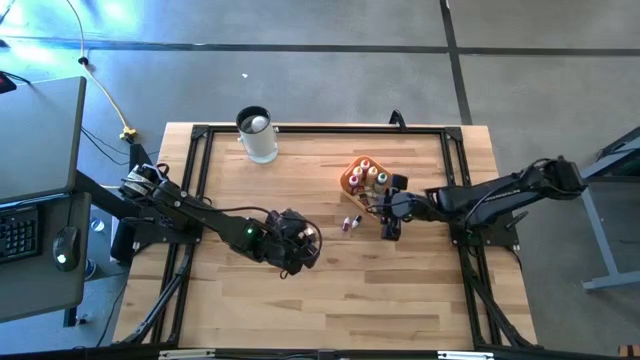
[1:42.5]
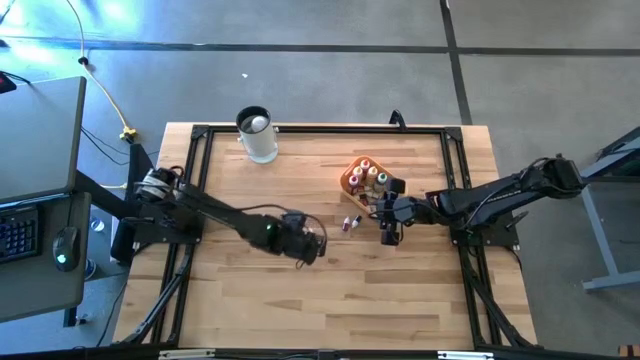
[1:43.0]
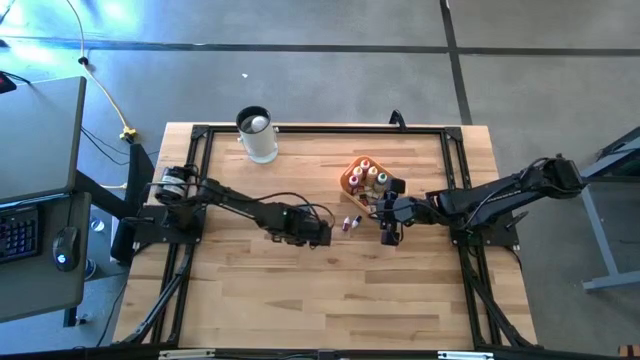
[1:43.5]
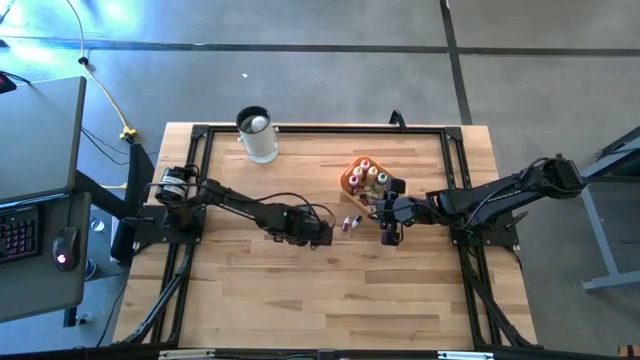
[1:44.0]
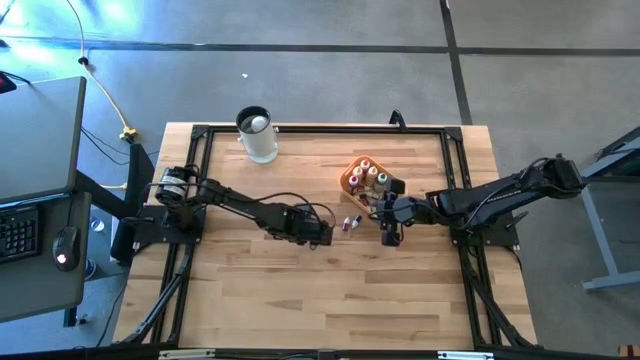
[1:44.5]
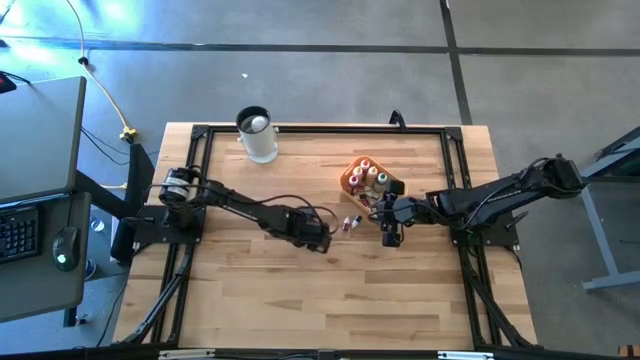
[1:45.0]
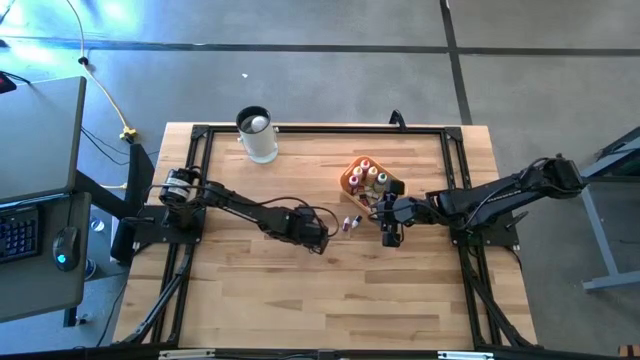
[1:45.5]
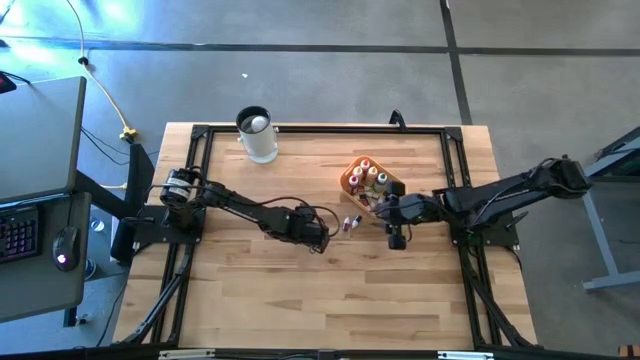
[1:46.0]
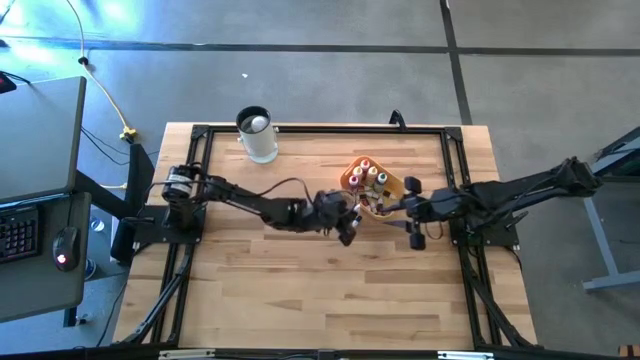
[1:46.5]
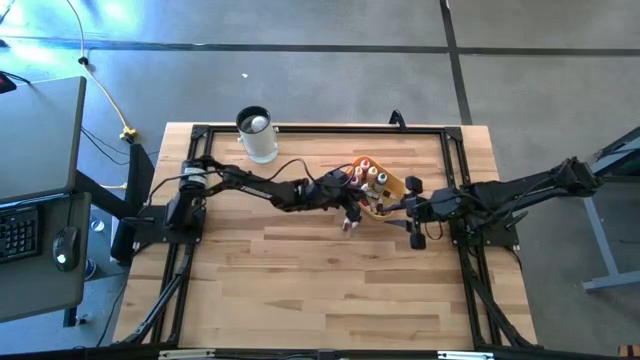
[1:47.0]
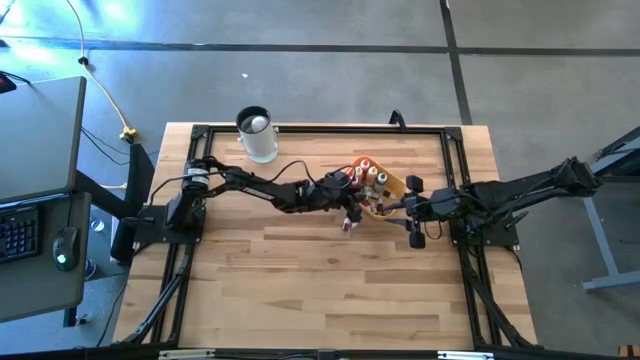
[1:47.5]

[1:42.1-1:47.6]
Task: Pick & Place food coloring
Put the small black food coloring bottle into the yellow bin

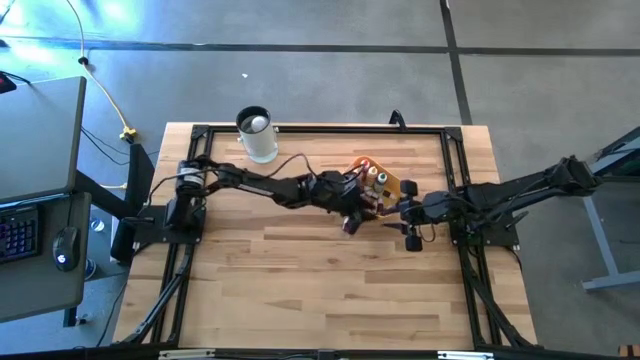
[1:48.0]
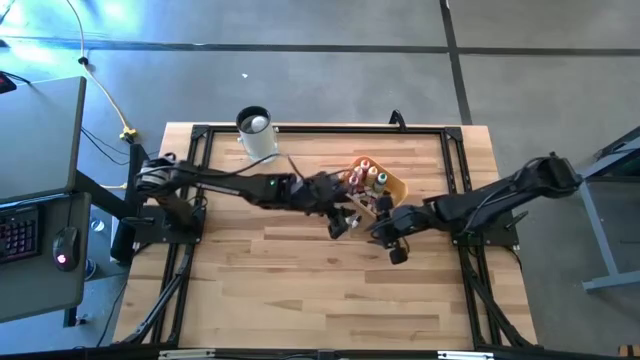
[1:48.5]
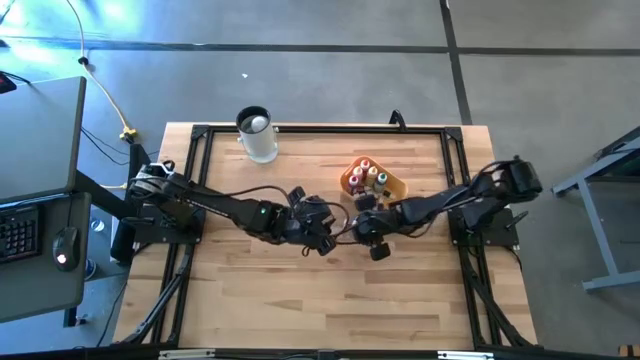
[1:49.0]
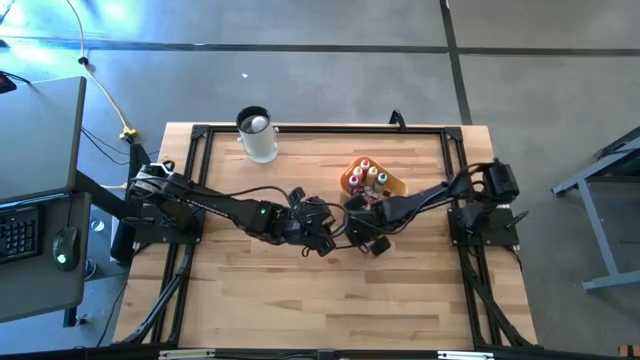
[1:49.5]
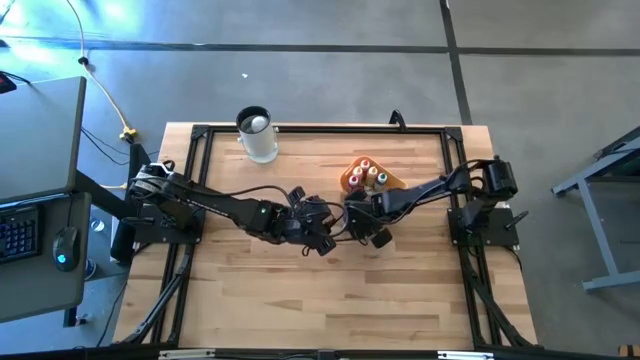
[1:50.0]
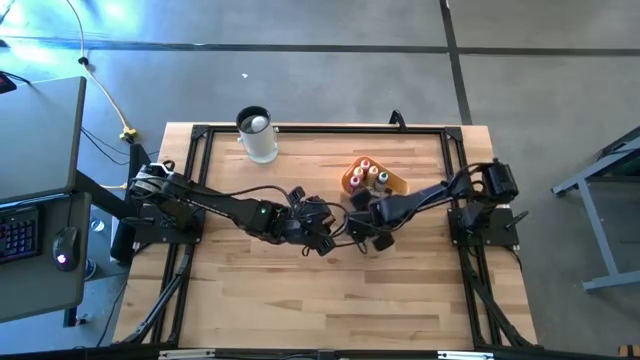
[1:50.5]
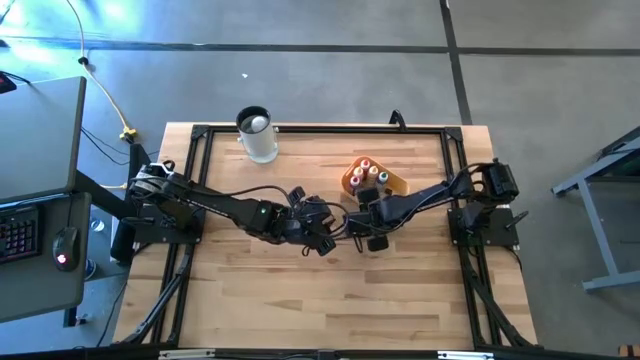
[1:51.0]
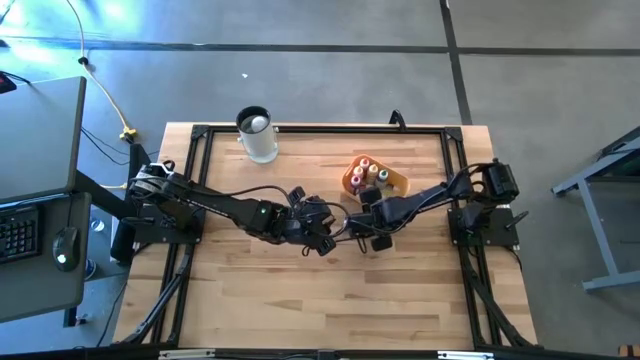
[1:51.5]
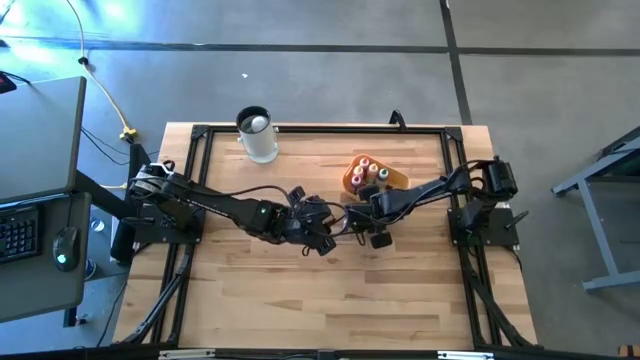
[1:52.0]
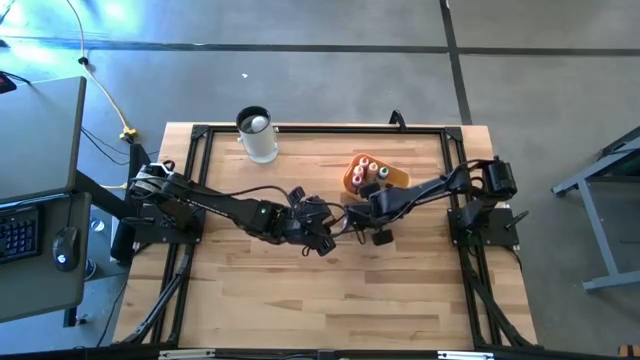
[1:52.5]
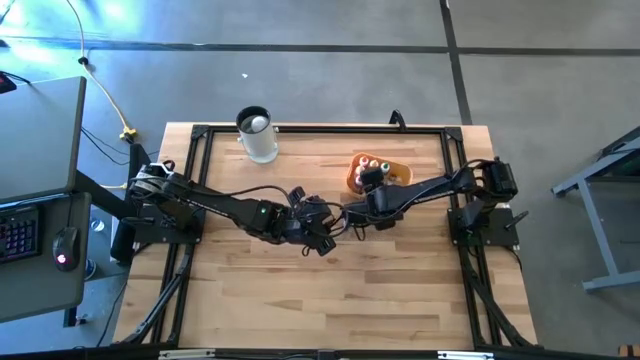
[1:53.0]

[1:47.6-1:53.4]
Put the small green food coloring bottle into the yellow bin

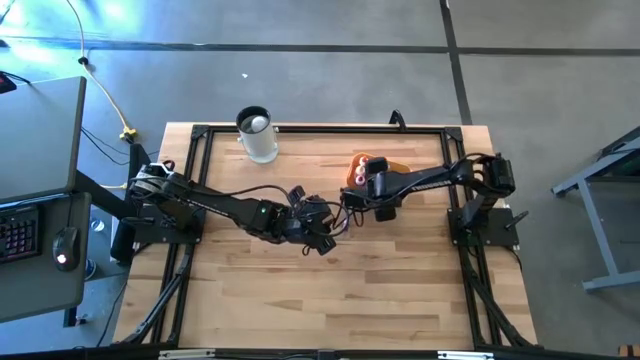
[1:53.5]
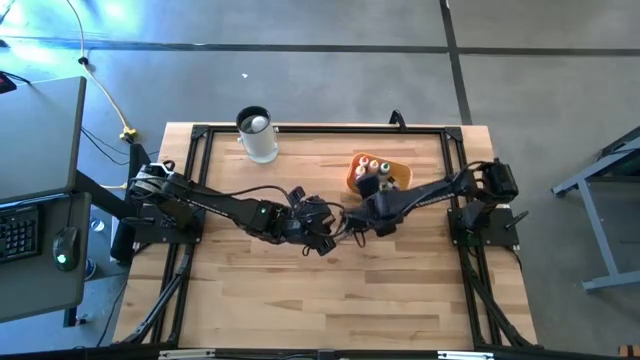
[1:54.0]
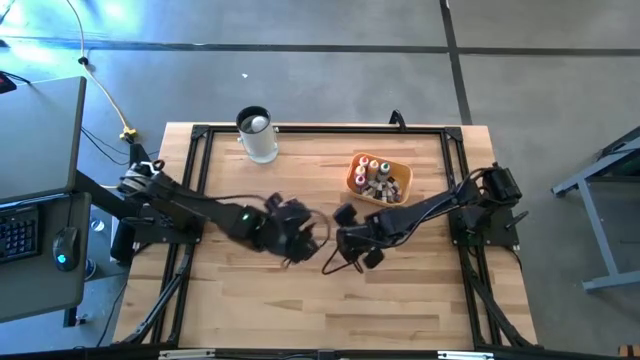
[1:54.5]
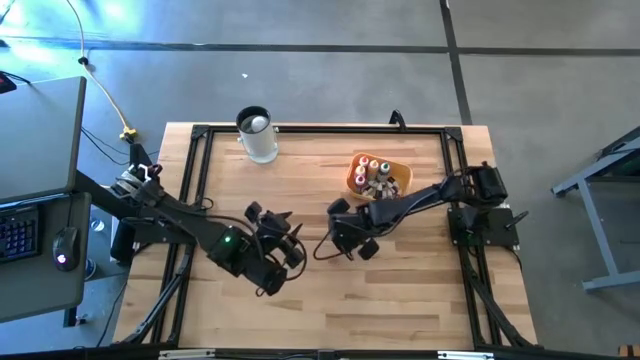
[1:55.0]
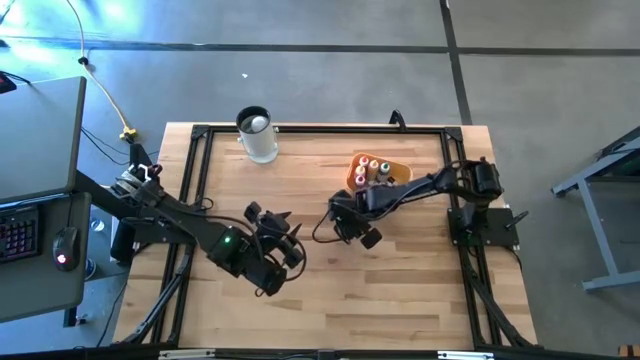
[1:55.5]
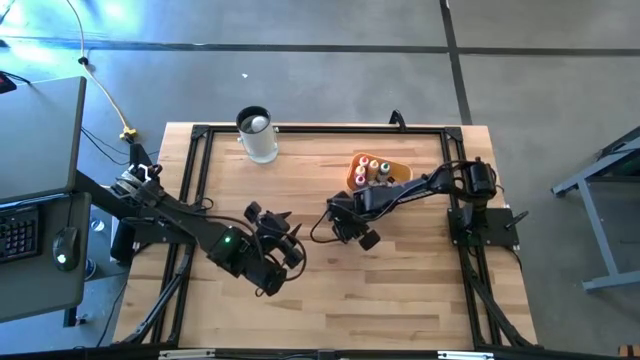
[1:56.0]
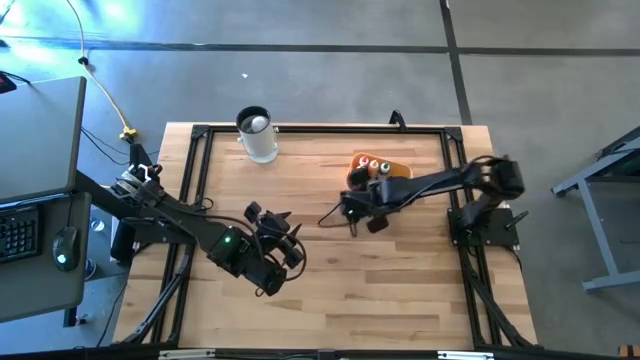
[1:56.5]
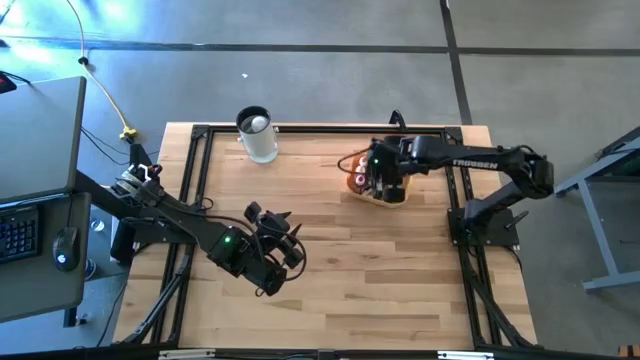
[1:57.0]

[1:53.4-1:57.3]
Put the small red food coloring bottle into the yellow bin

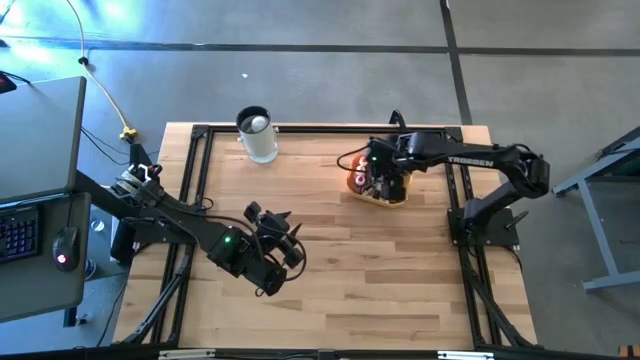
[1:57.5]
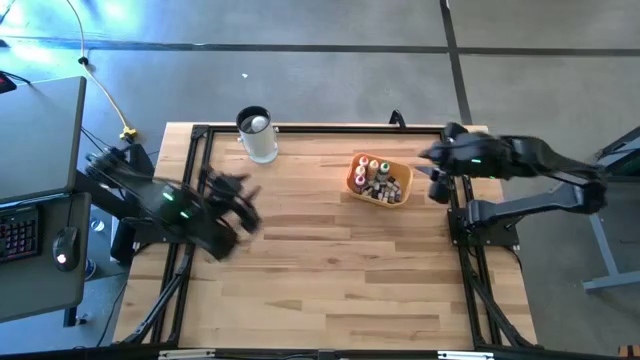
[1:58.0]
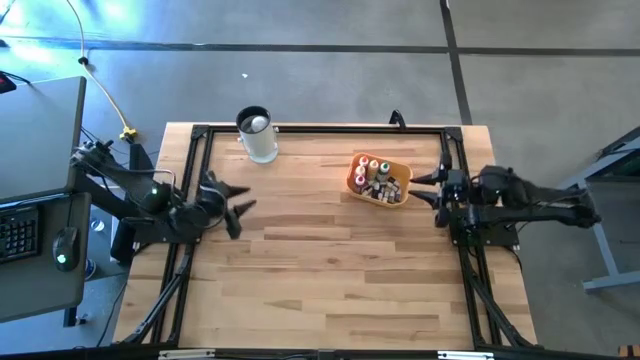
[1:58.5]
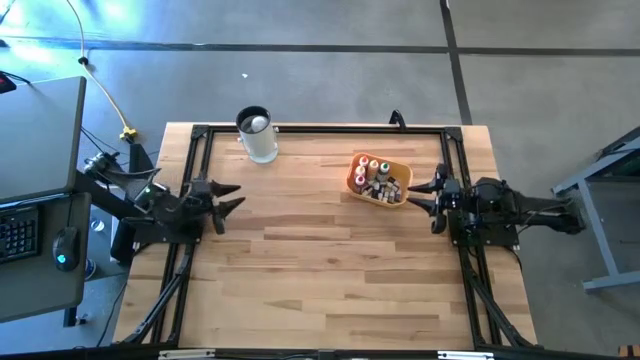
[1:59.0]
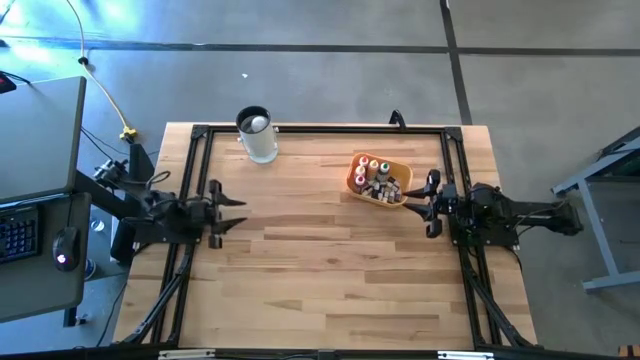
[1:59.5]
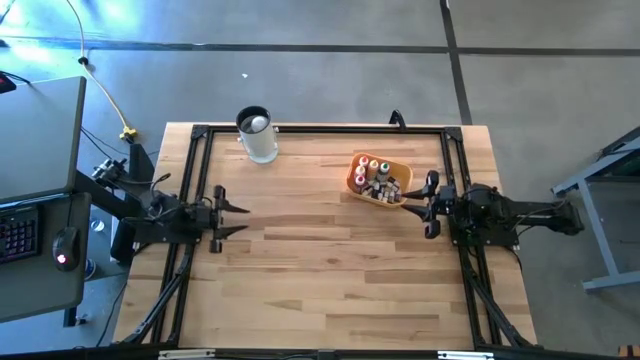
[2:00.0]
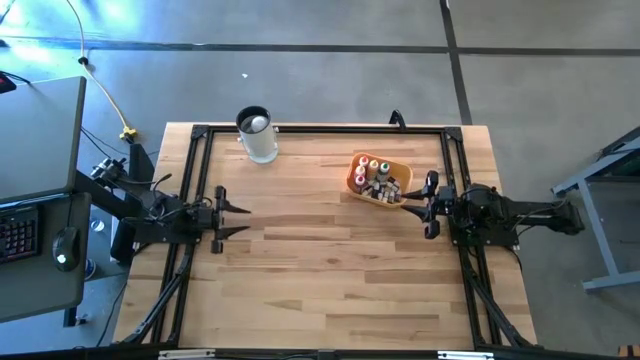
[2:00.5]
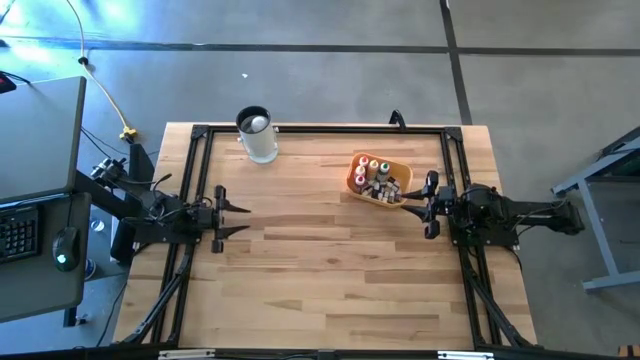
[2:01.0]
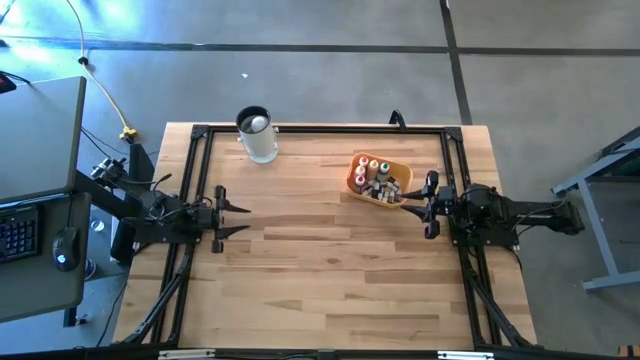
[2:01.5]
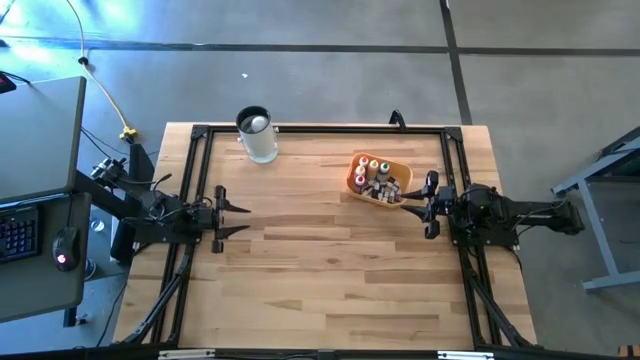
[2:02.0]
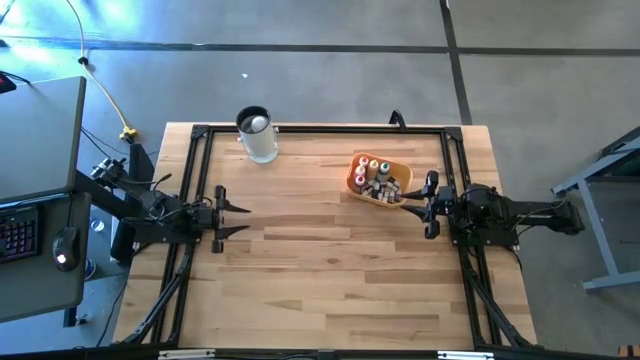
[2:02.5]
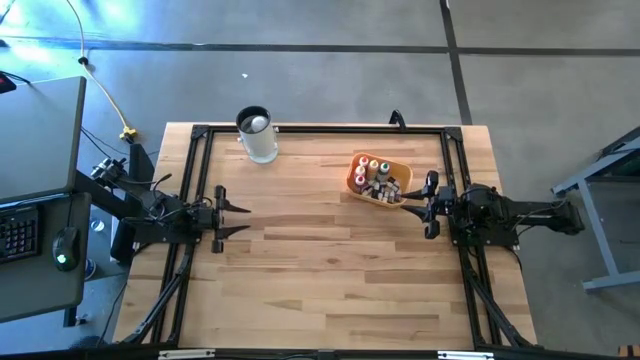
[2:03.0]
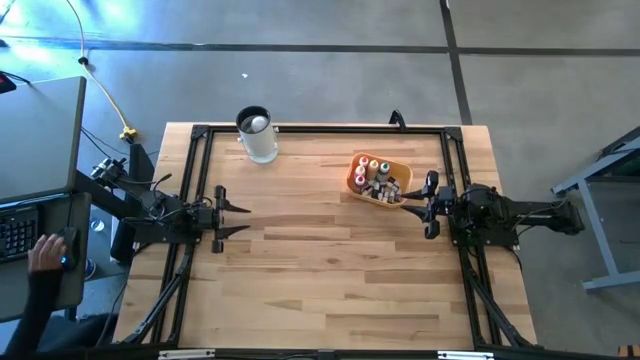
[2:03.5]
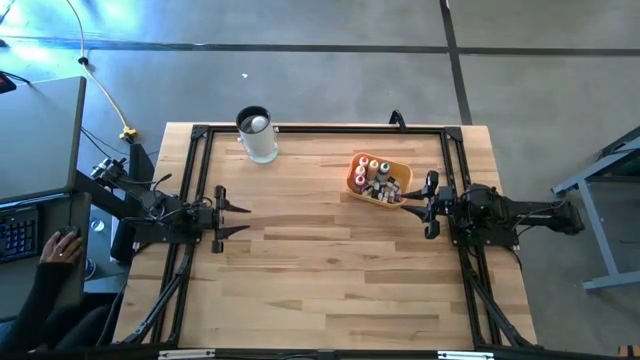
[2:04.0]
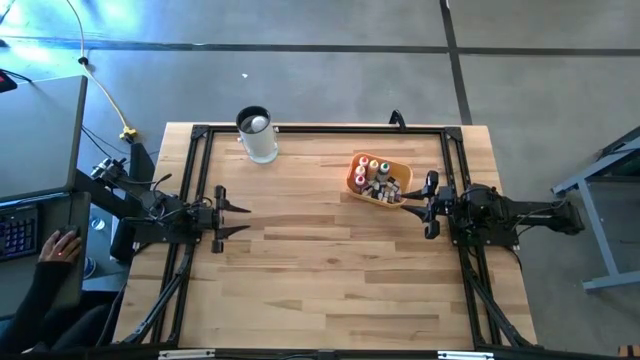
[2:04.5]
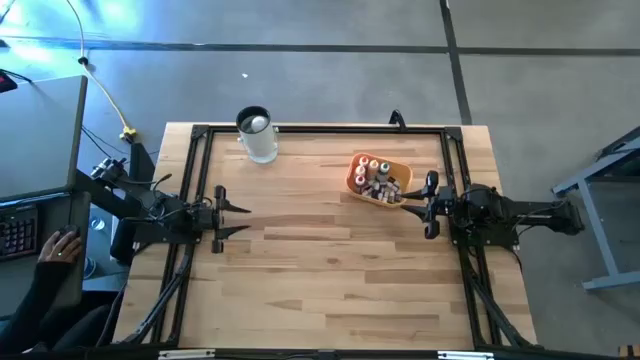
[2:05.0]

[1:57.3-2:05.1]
Return to Home Position
